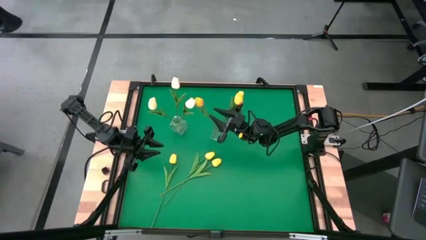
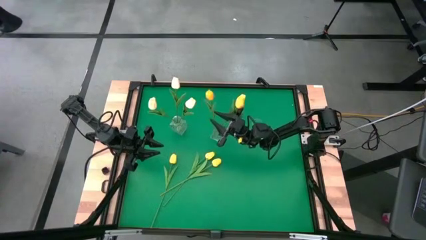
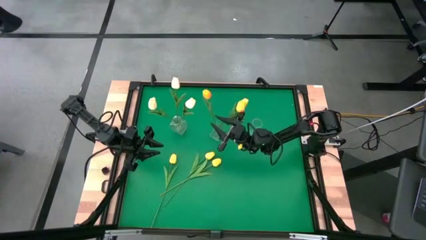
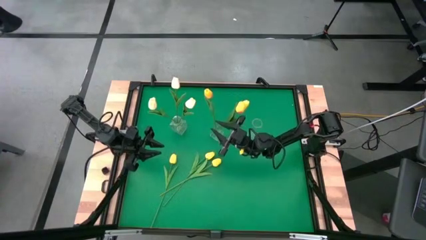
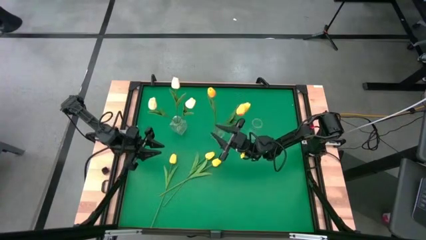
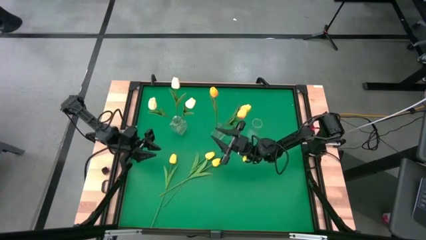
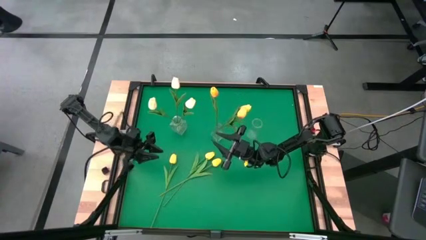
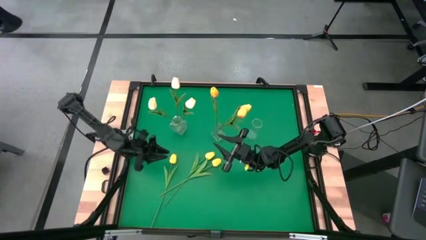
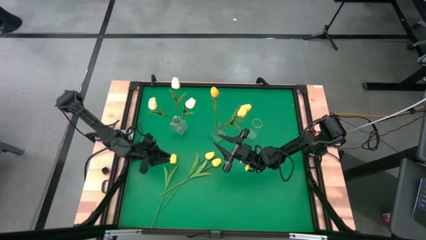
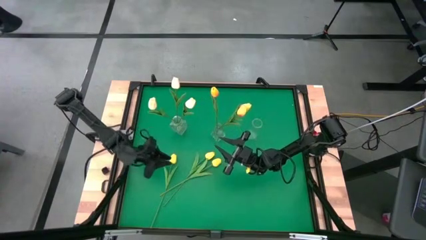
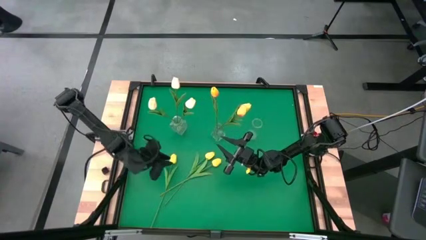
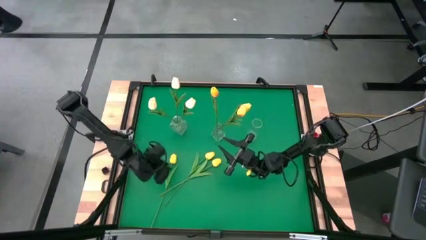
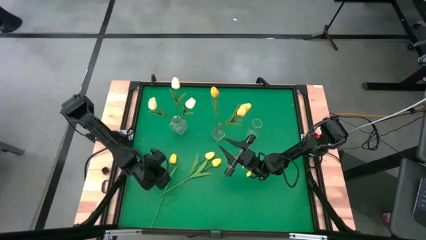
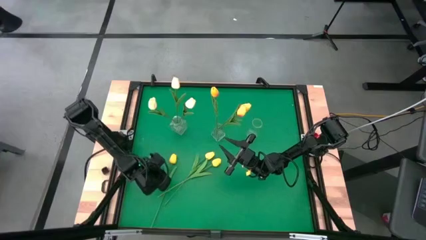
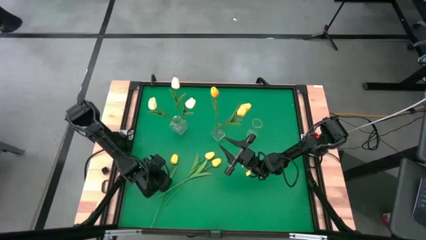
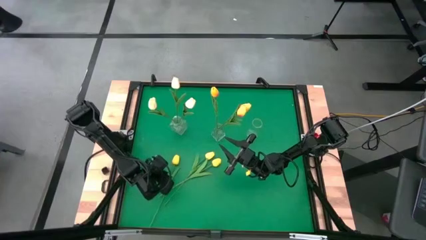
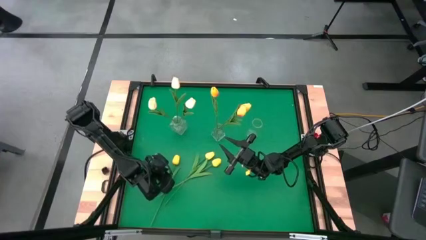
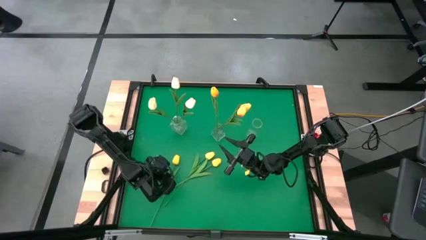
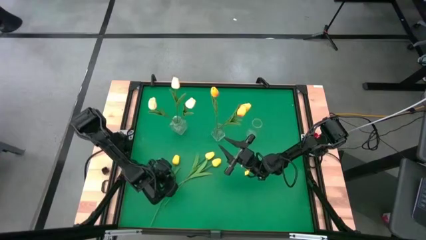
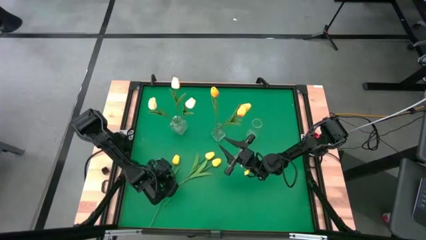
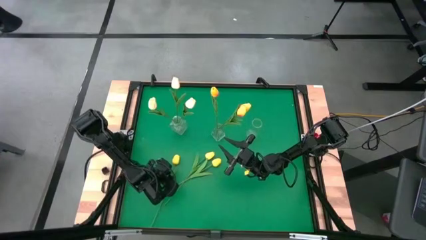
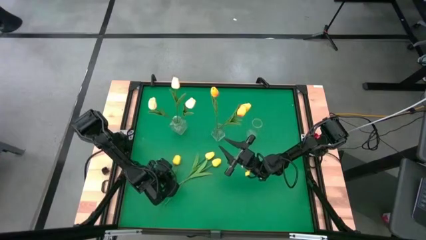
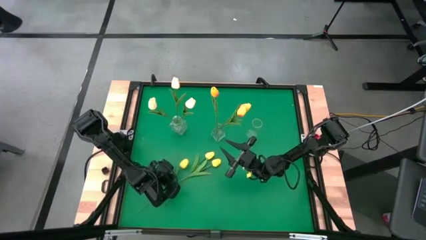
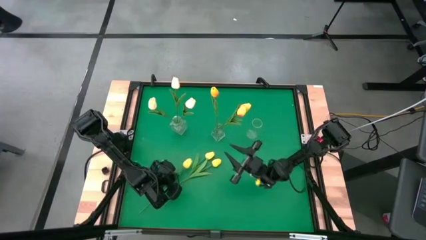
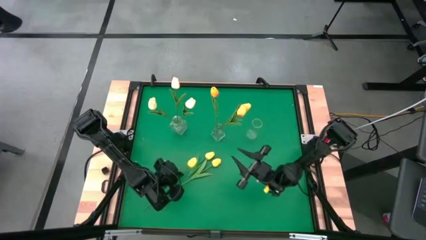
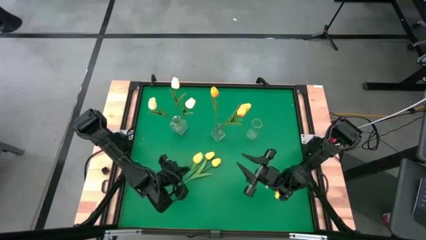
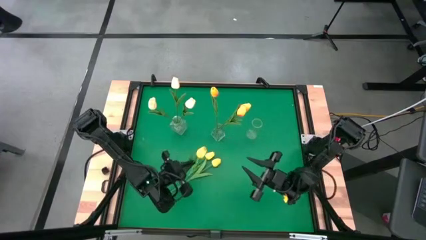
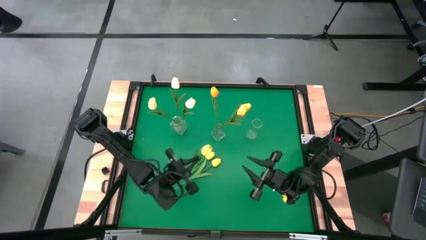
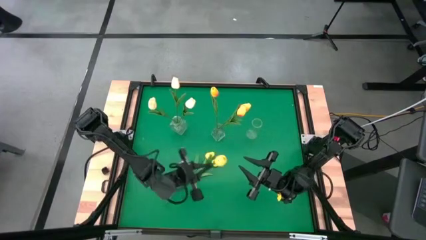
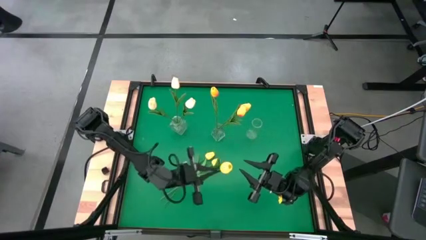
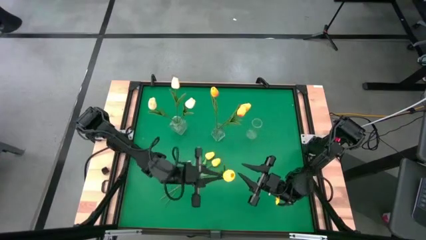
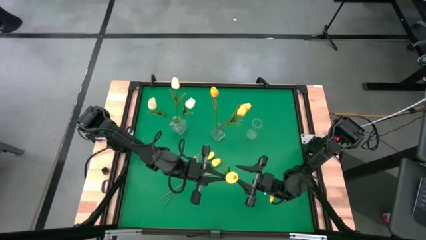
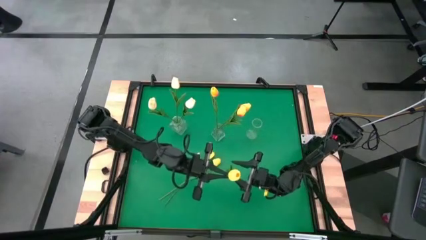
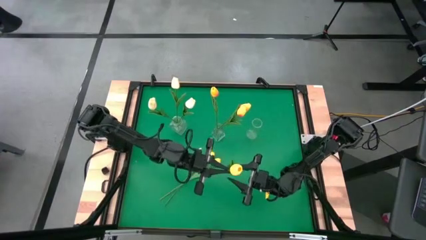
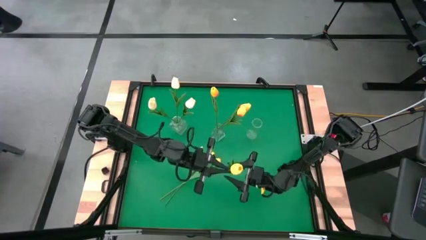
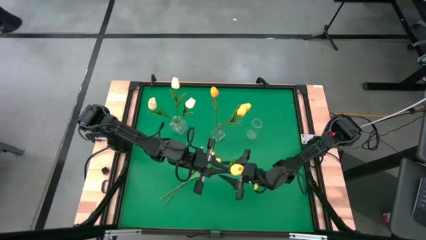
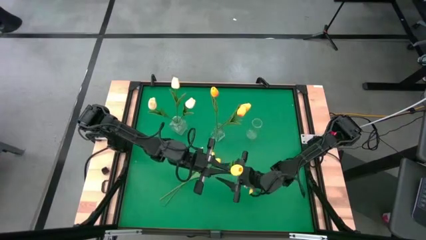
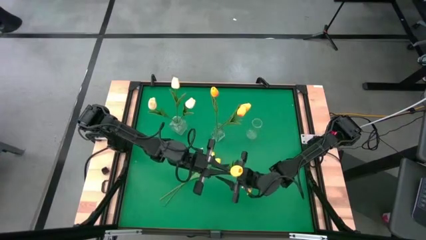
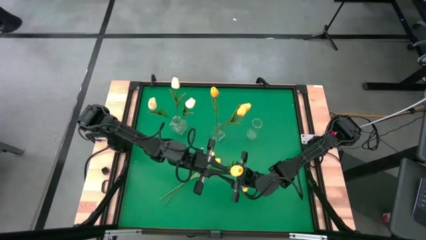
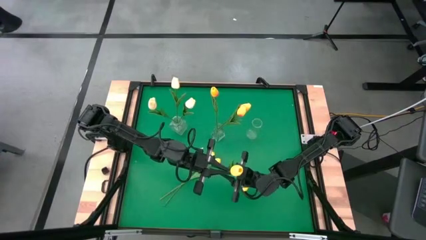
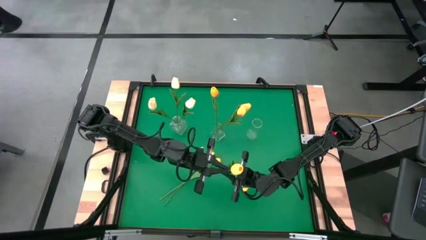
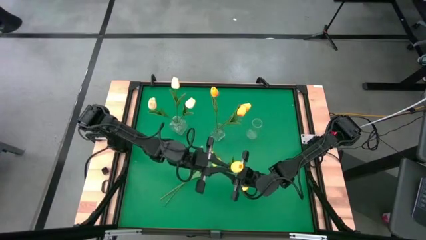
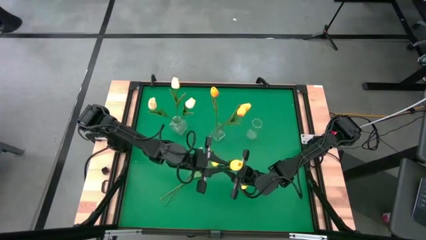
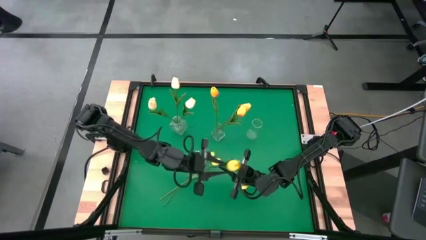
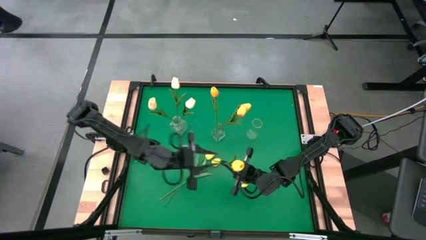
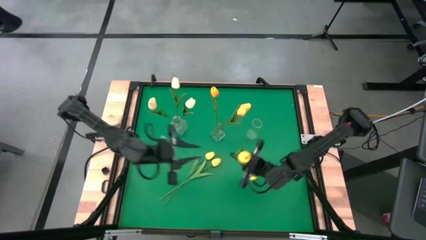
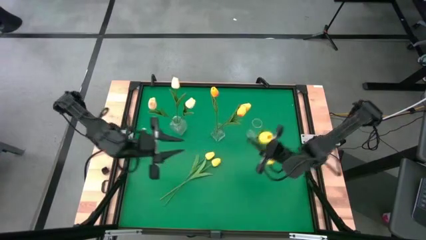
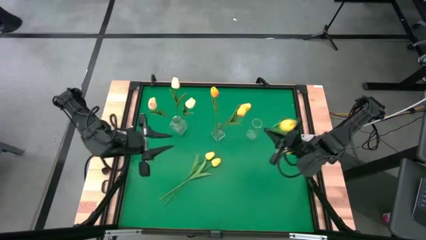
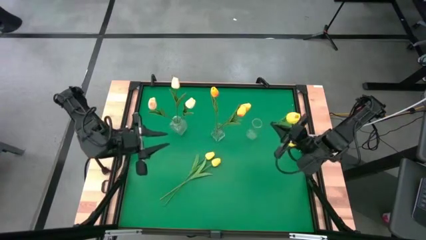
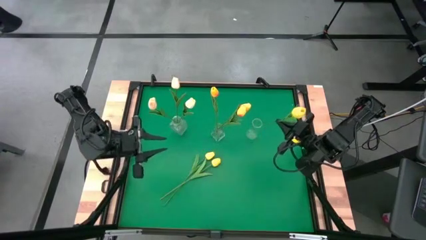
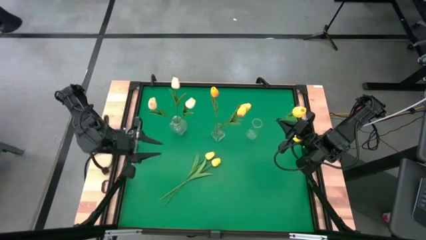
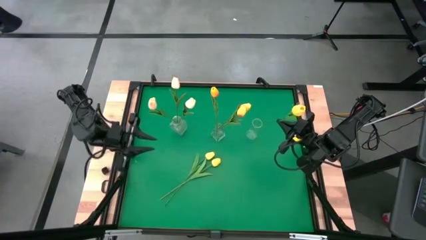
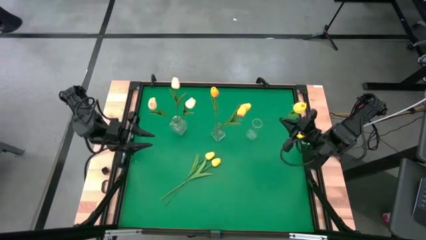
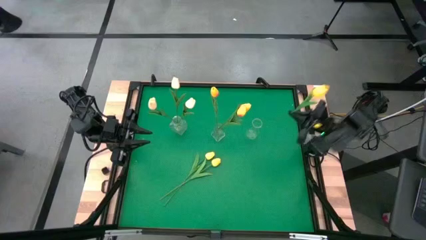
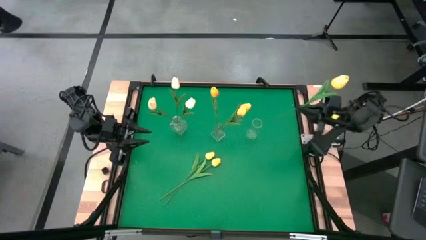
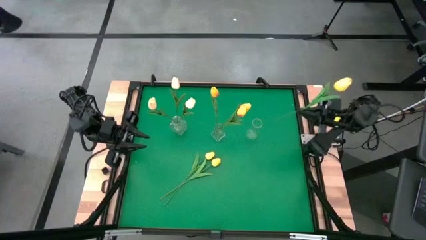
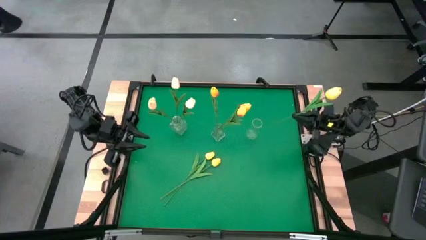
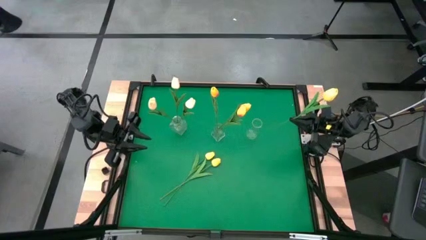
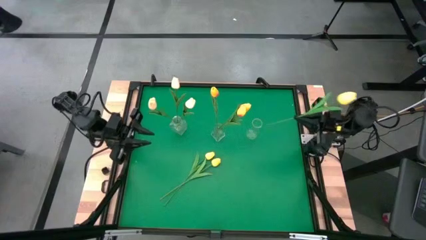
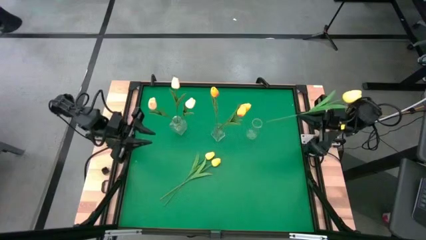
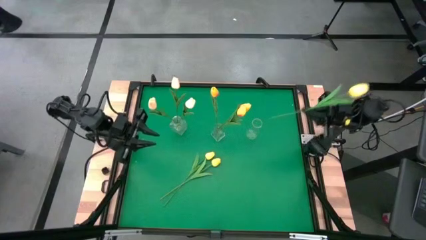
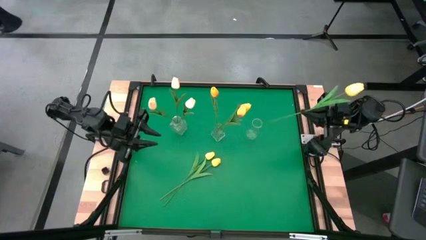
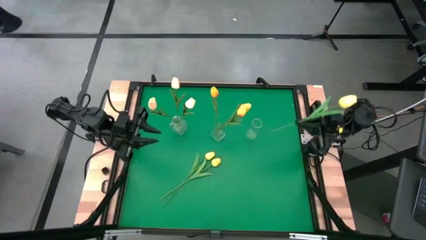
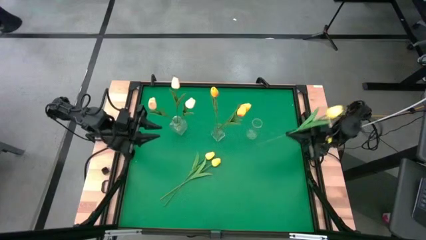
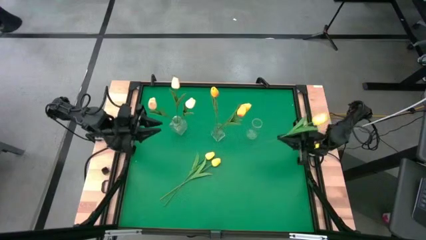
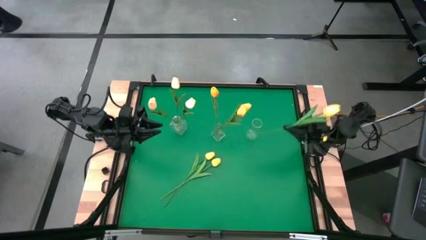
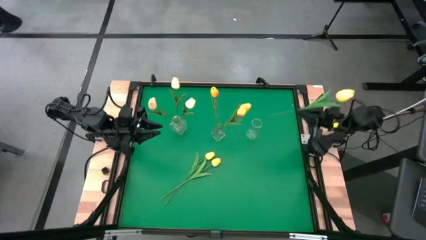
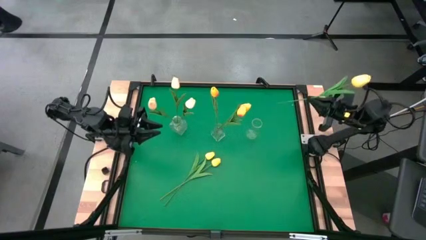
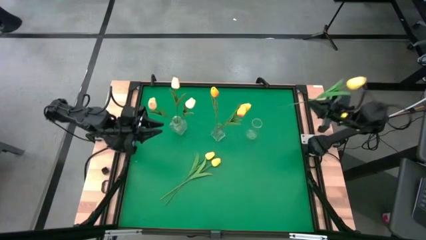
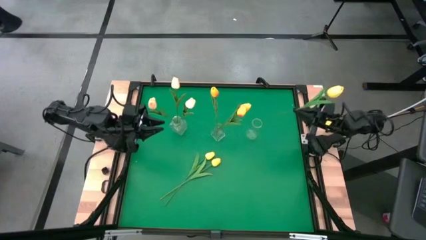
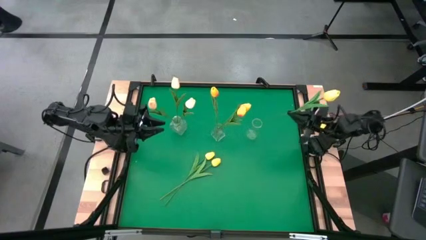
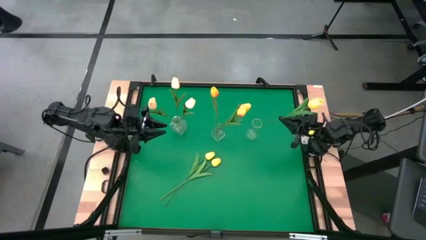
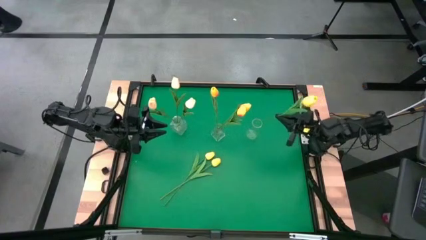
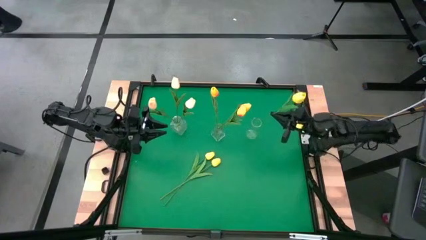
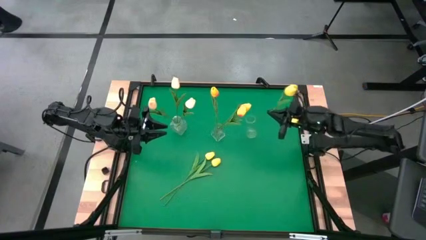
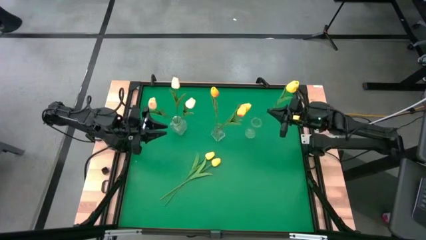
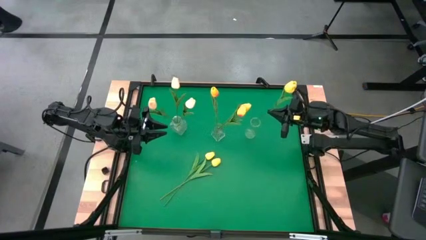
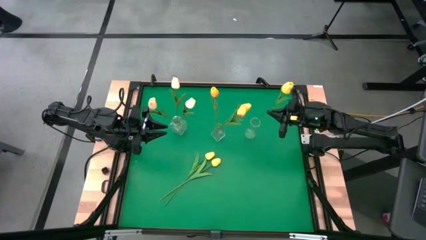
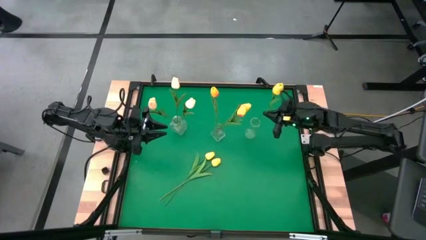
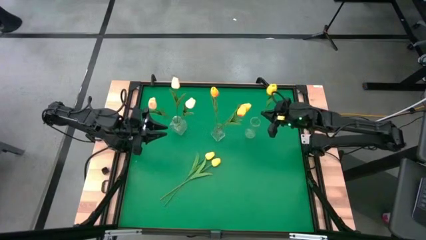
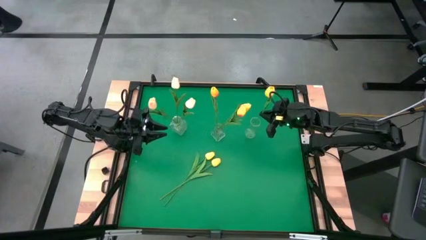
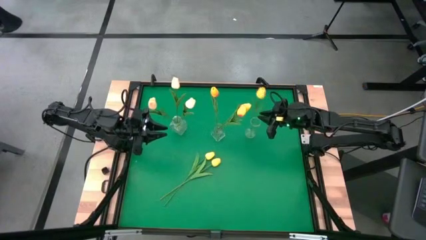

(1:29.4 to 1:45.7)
Task: Sort flowers into vase by color
Put the left yellow flower into the right transparent vase
